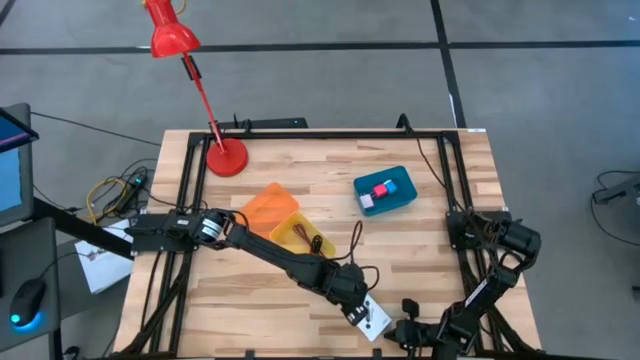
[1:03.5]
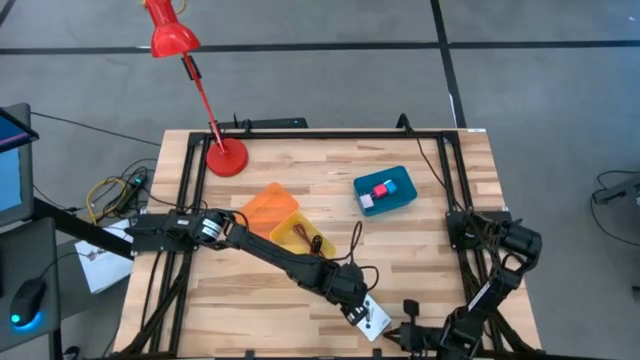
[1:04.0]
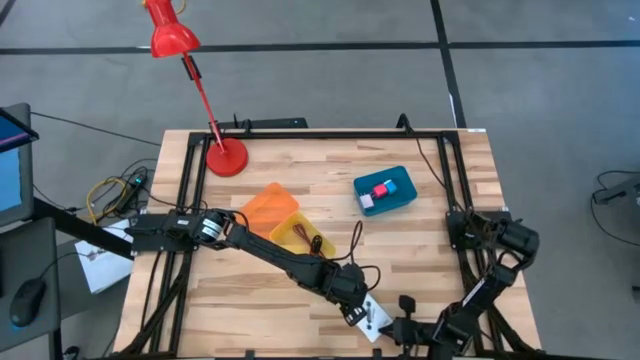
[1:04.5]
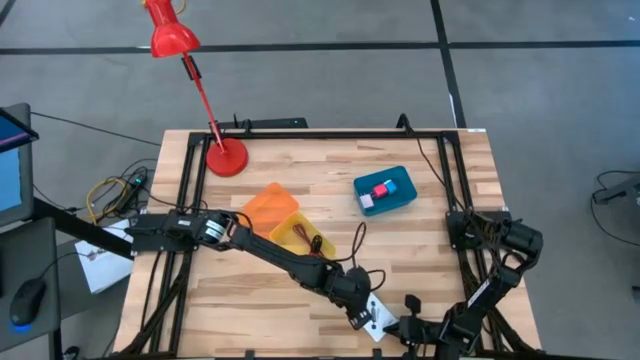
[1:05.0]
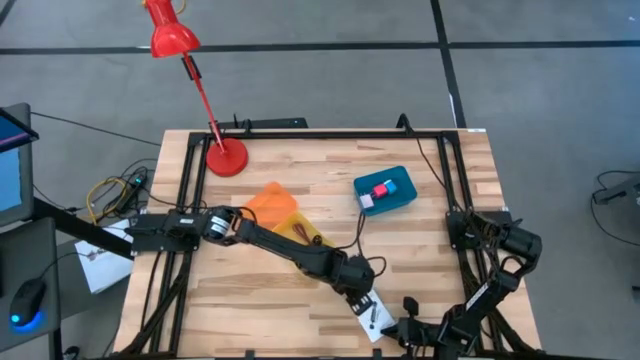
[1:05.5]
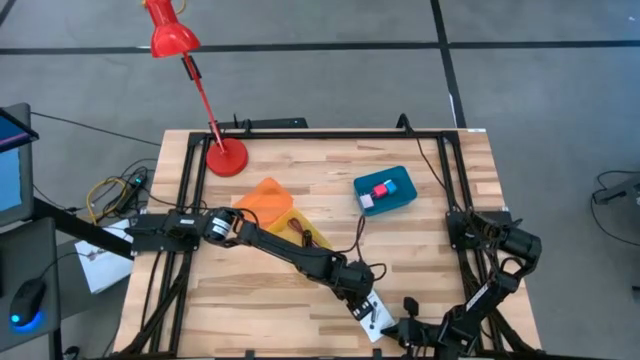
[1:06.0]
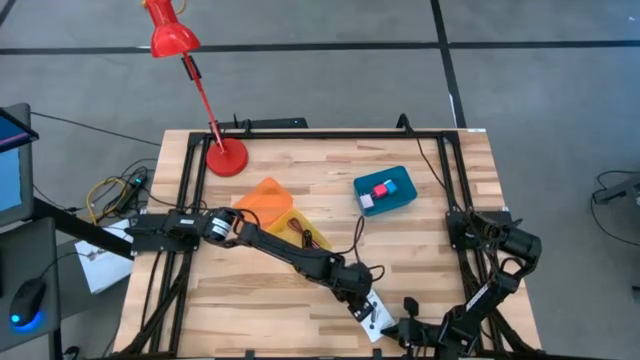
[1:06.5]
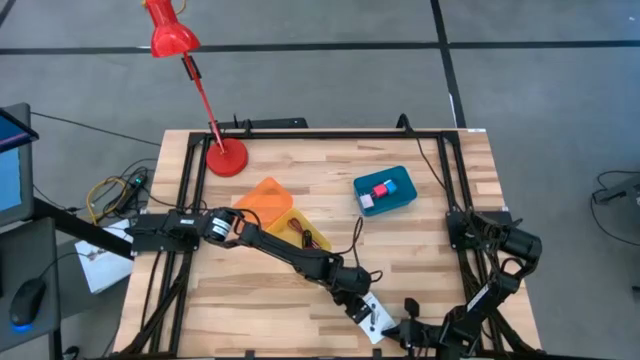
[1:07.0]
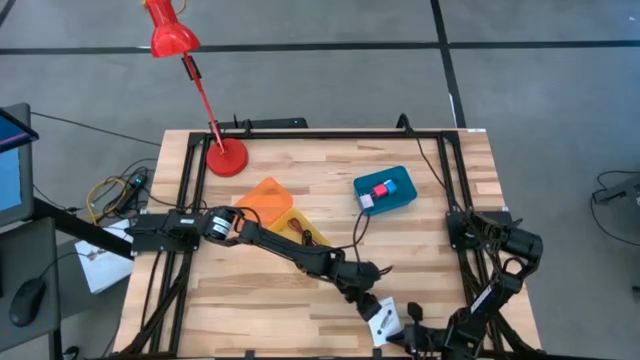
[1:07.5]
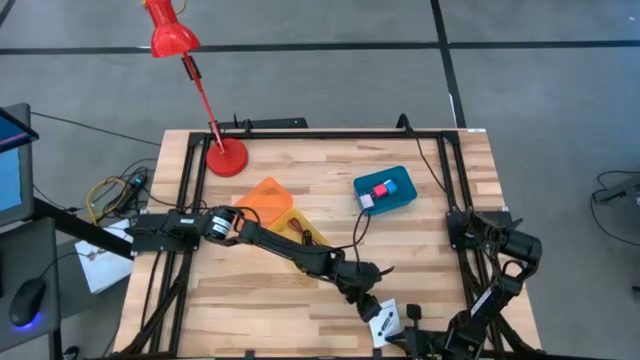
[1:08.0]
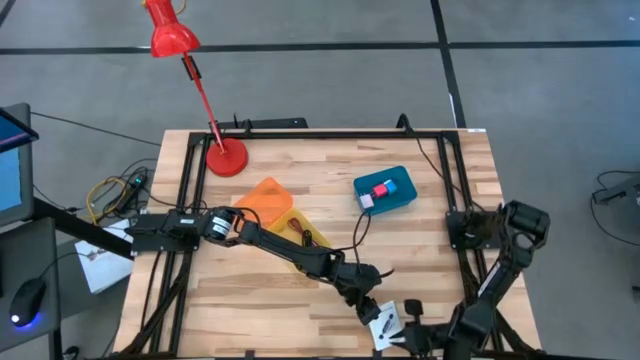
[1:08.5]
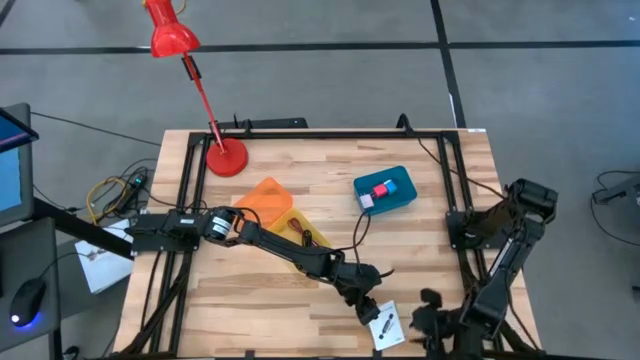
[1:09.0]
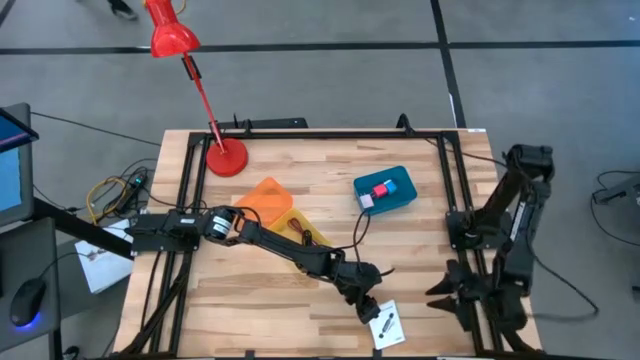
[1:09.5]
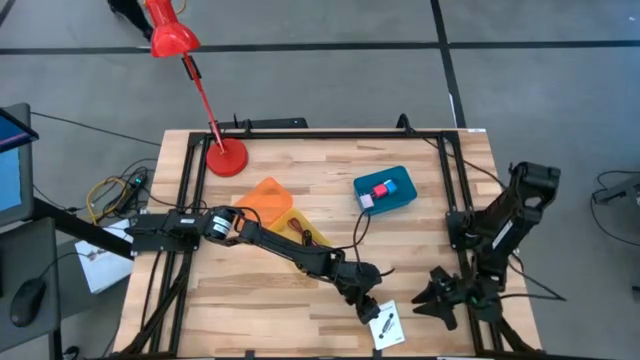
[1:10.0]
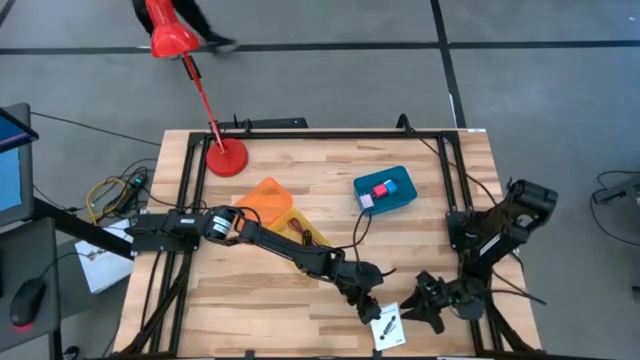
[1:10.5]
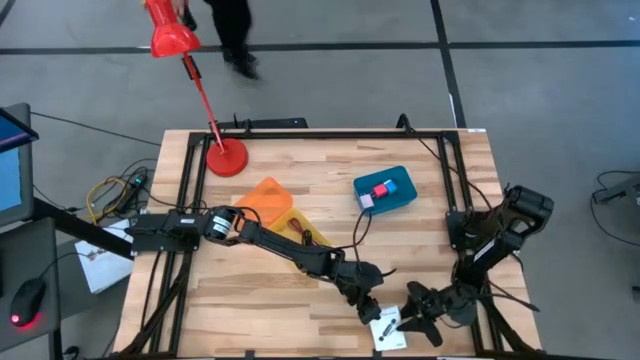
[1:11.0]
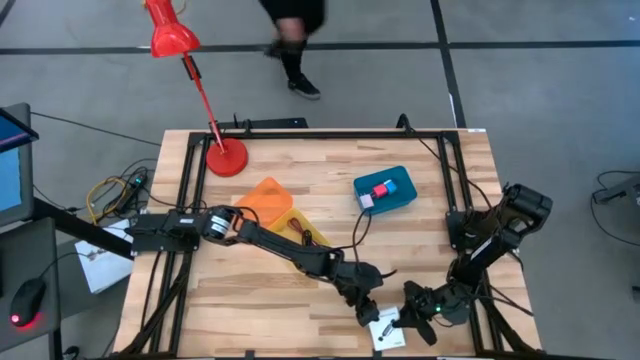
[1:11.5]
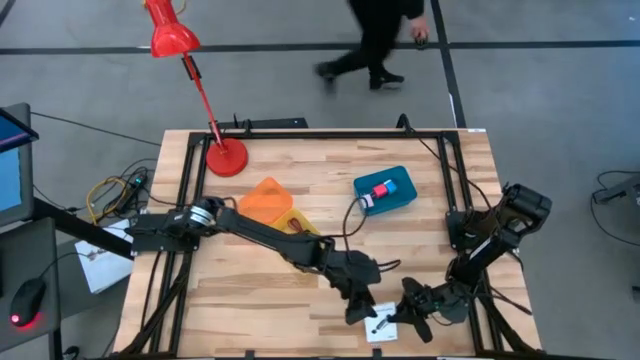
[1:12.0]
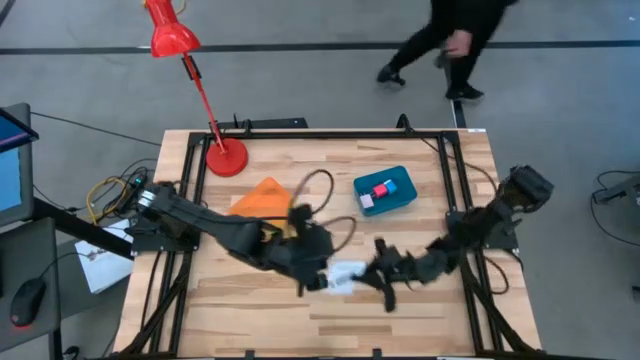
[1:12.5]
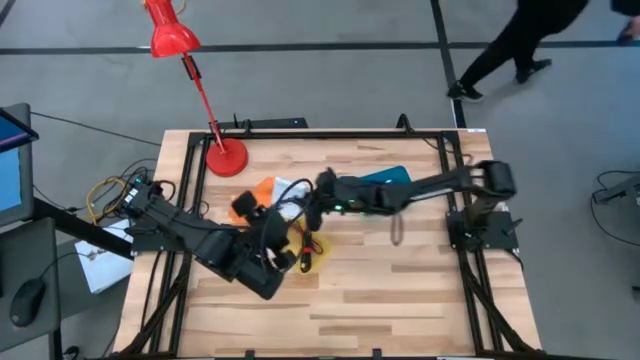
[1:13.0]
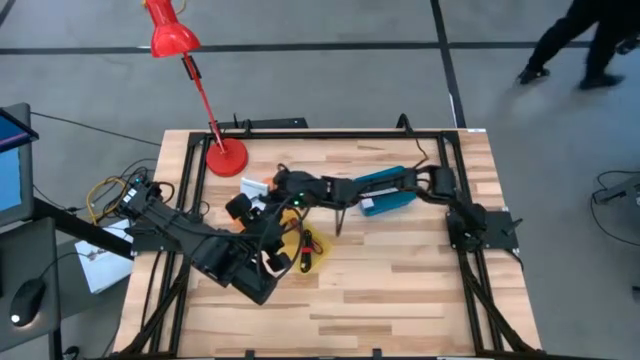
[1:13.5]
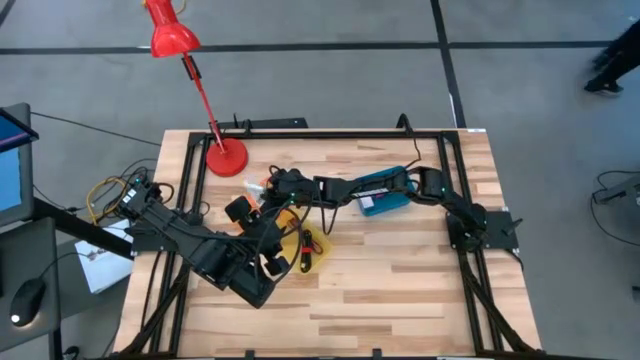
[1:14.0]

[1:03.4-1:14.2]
Task: Pick and place items into bin
Put the card reader box into the orange bin

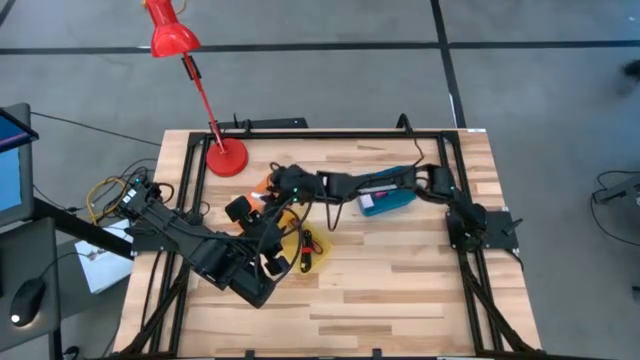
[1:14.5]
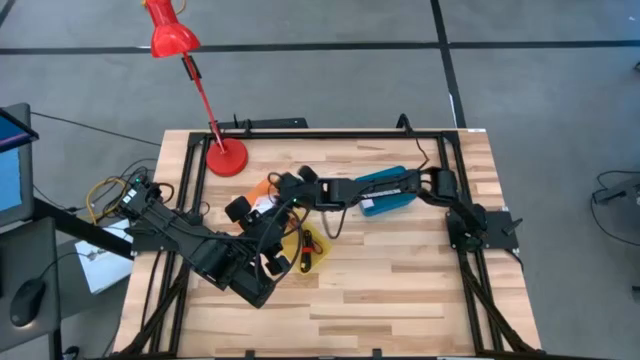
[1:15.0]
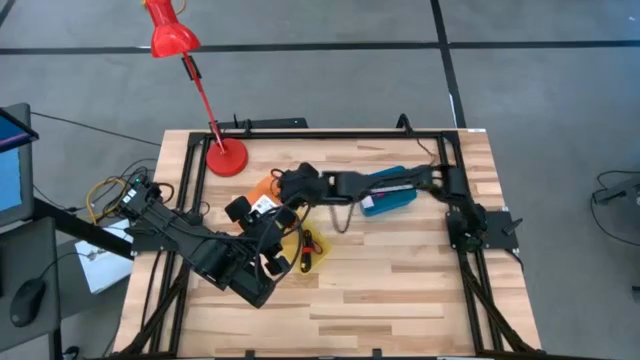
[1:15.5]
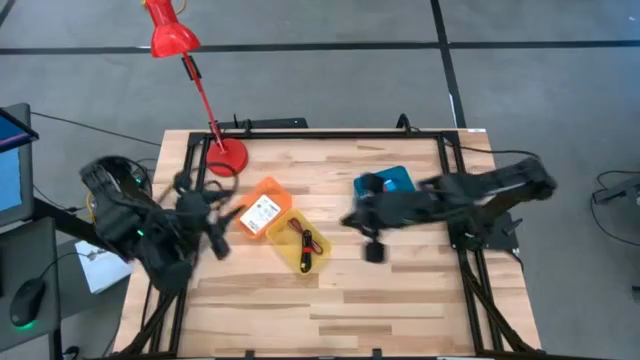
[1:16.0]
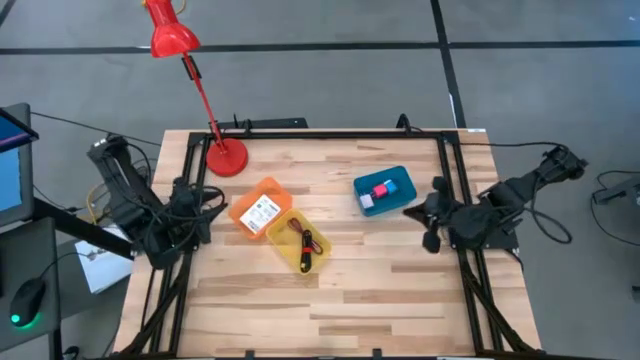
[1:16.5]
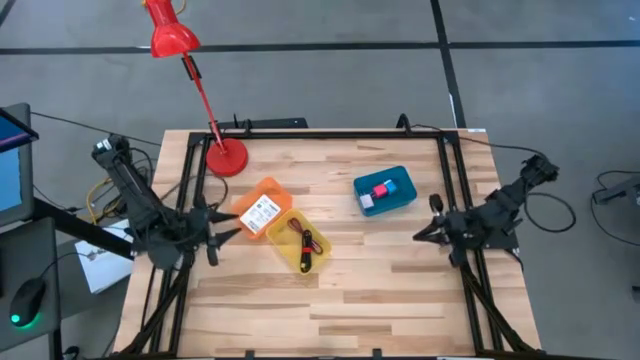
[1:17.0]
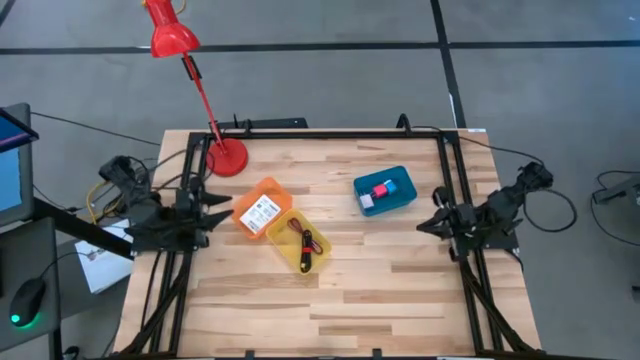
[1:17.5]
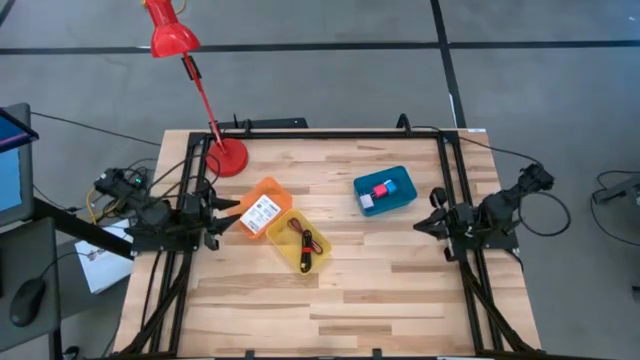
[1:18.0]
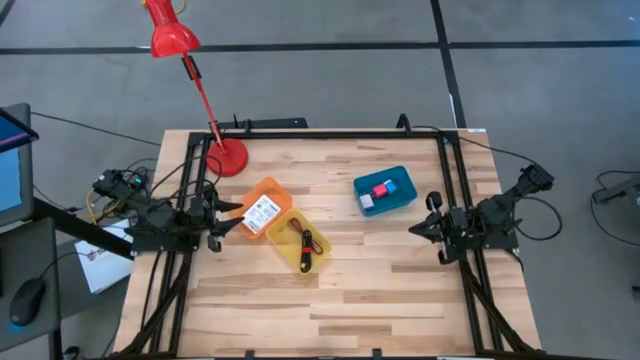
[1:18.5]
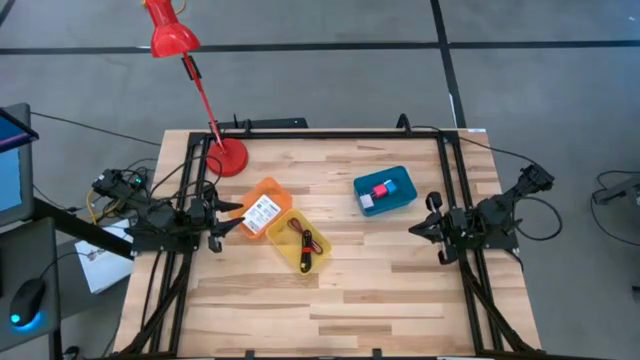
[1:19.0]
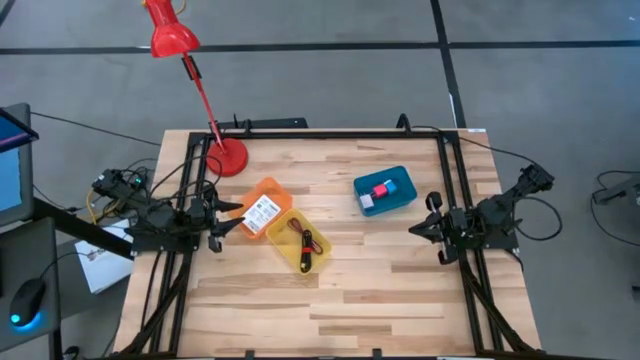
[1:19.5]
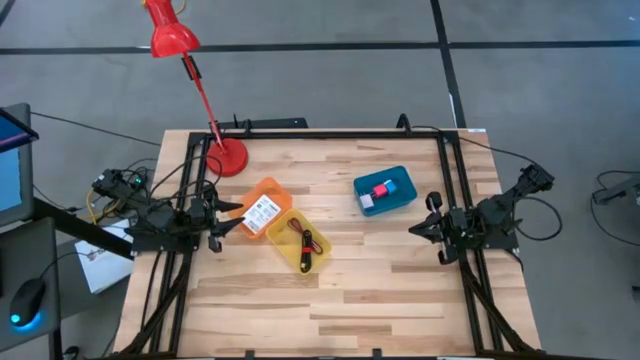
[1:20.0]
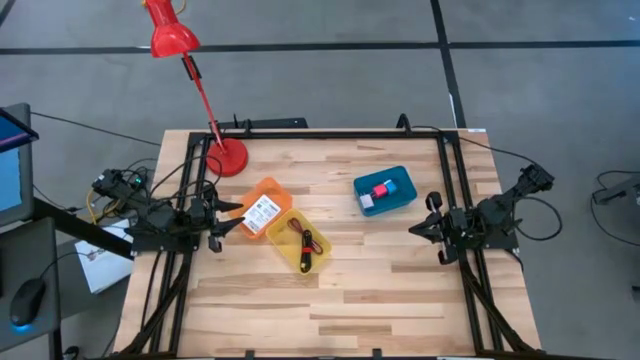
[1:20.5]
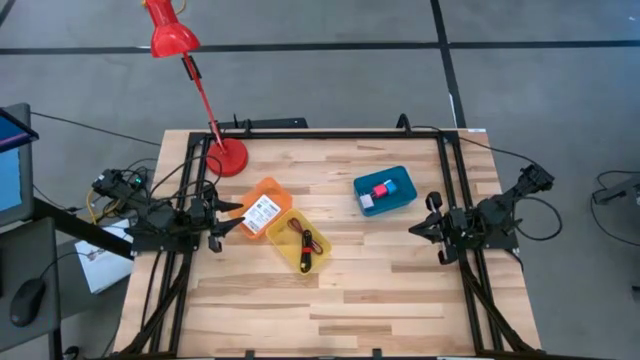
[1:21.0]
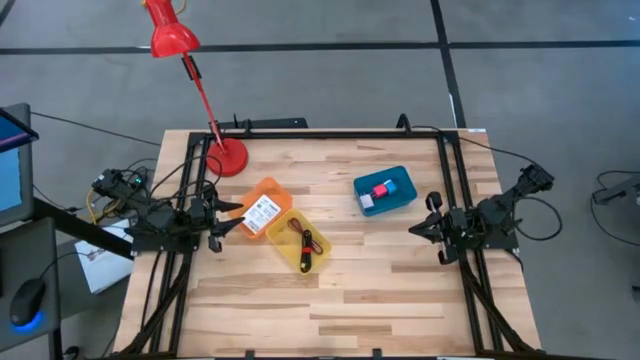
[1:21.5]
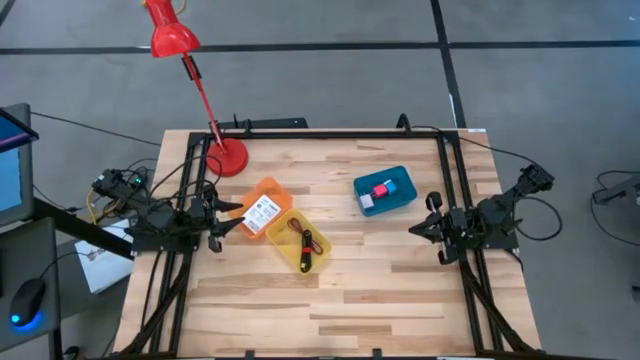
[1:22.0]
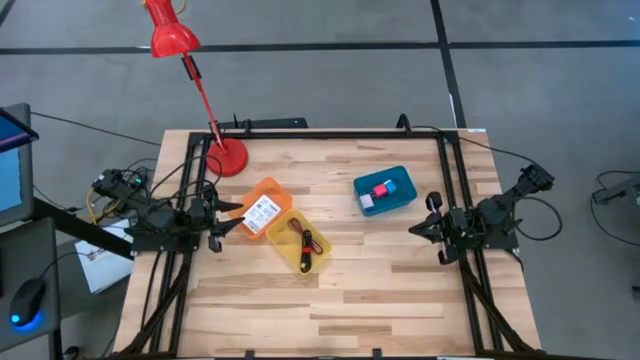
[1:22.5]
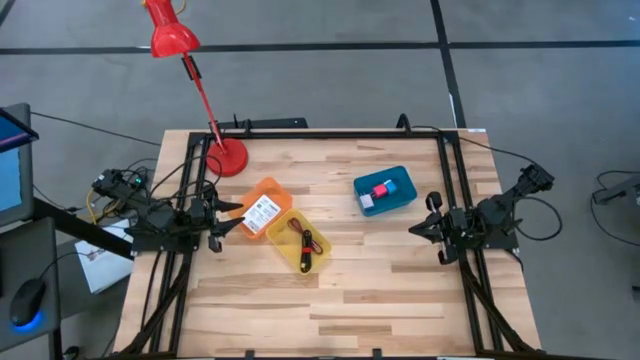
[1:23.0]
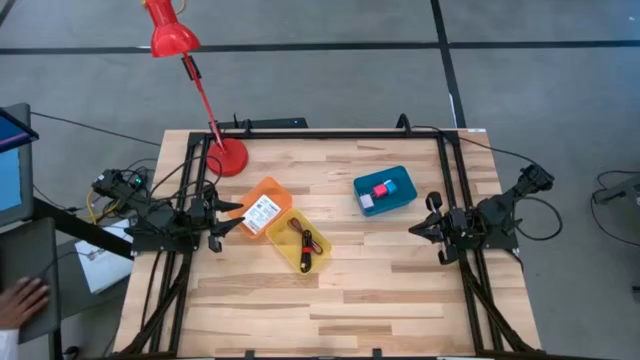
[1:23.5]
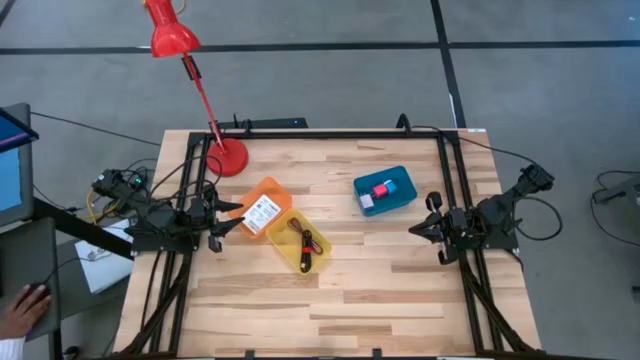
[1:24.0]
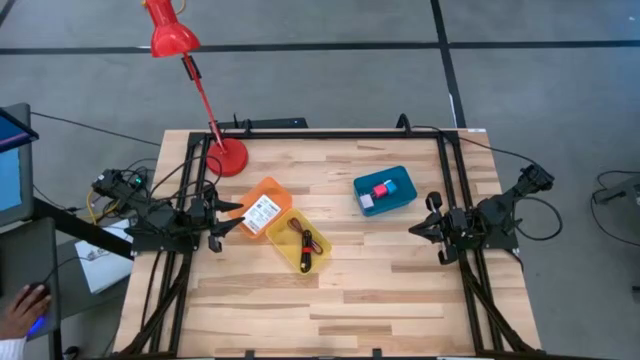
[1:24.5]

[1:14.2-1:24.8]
Return to Home Position
